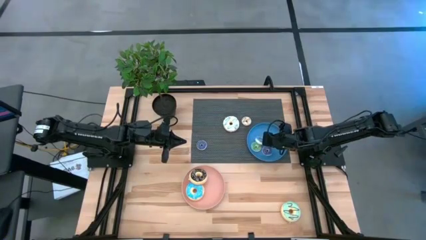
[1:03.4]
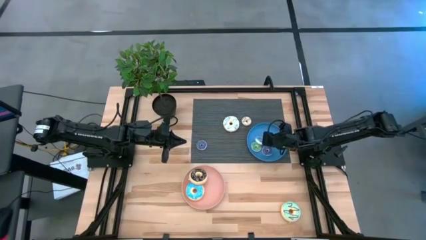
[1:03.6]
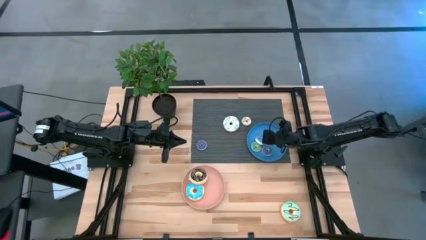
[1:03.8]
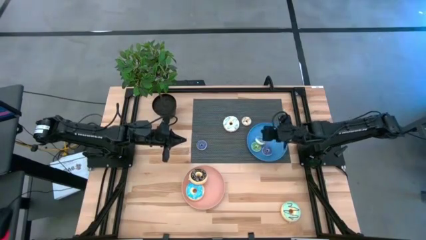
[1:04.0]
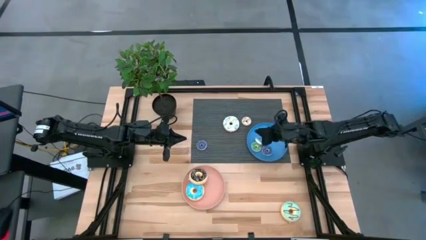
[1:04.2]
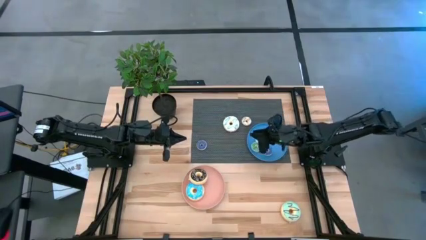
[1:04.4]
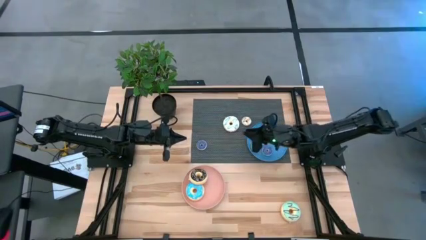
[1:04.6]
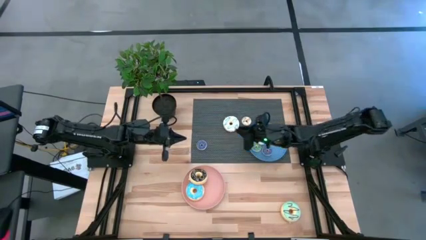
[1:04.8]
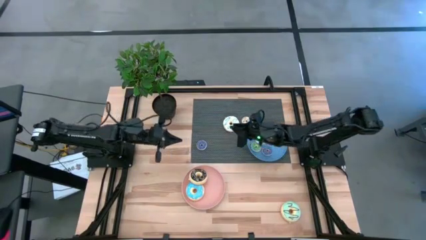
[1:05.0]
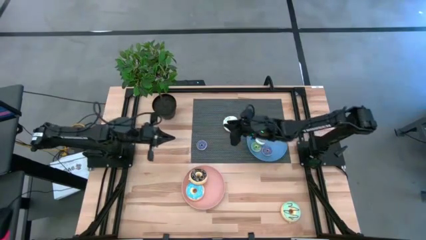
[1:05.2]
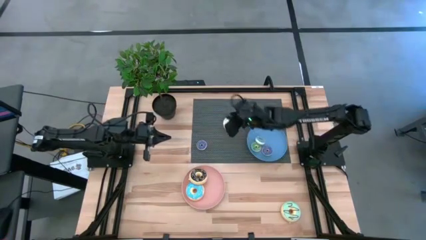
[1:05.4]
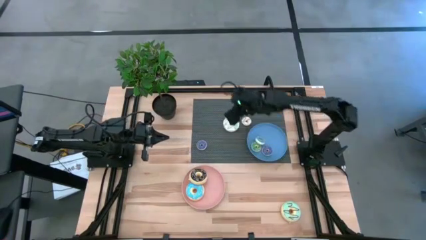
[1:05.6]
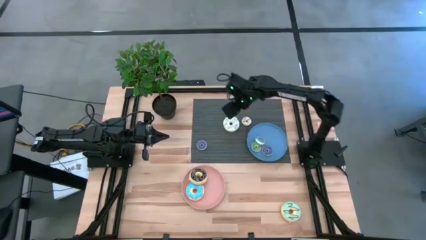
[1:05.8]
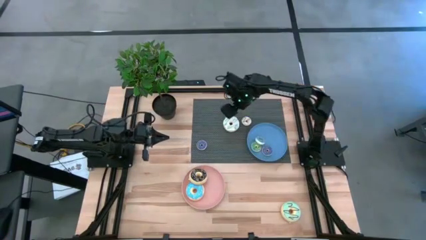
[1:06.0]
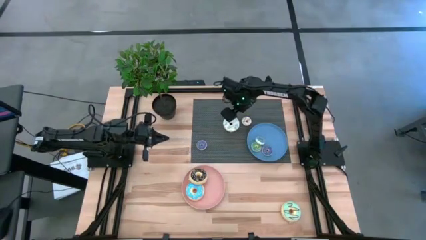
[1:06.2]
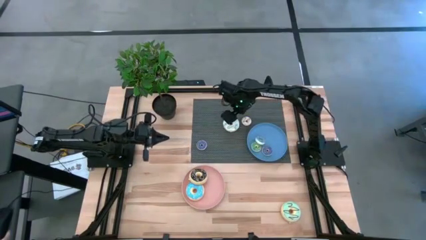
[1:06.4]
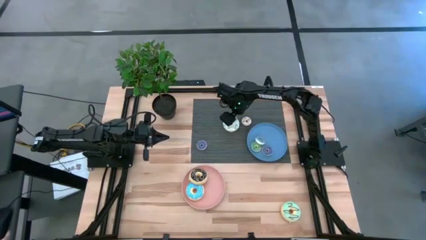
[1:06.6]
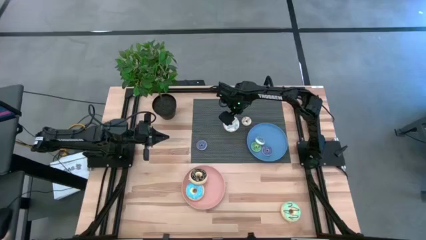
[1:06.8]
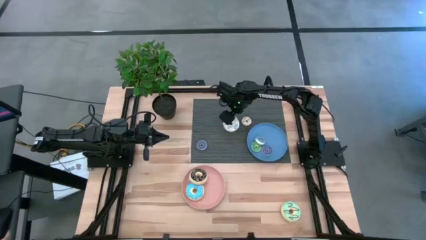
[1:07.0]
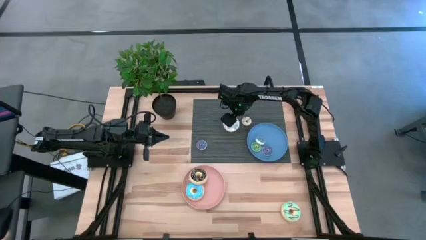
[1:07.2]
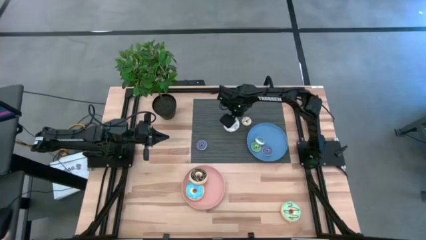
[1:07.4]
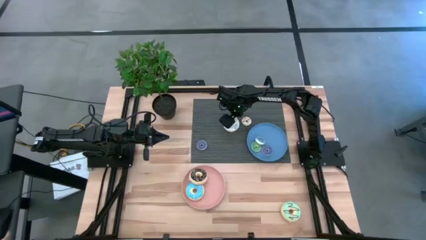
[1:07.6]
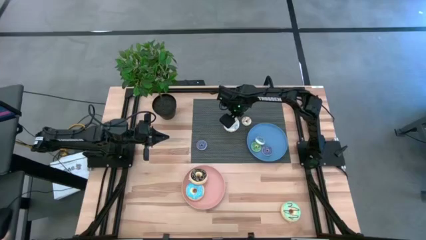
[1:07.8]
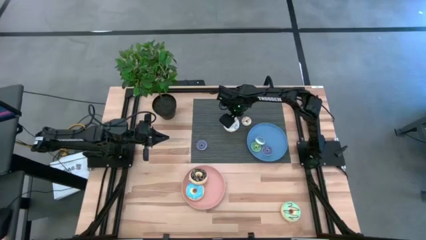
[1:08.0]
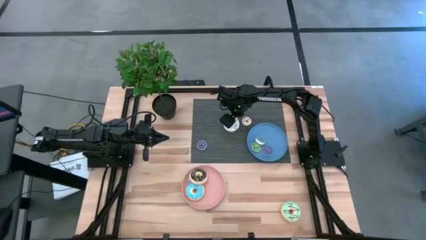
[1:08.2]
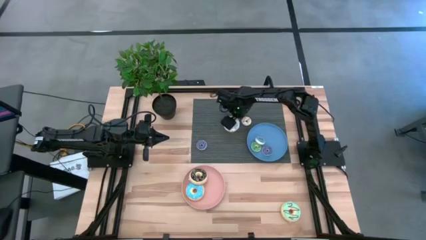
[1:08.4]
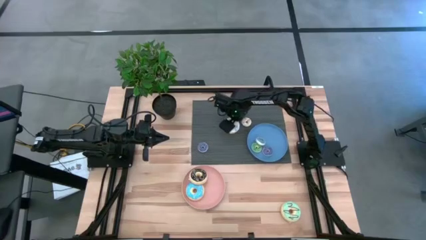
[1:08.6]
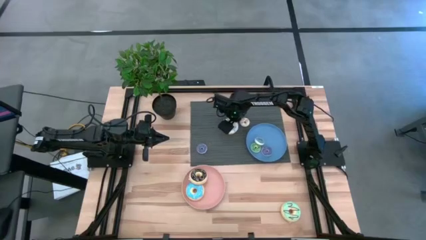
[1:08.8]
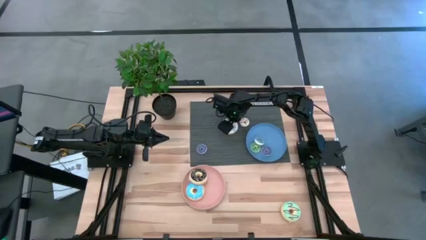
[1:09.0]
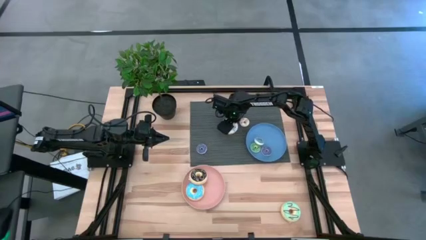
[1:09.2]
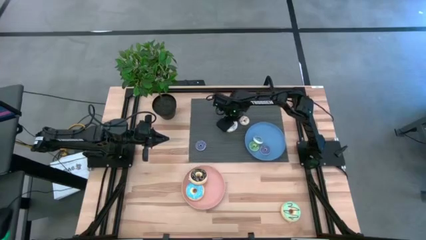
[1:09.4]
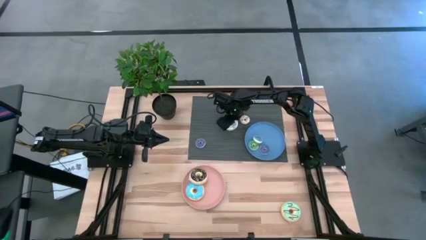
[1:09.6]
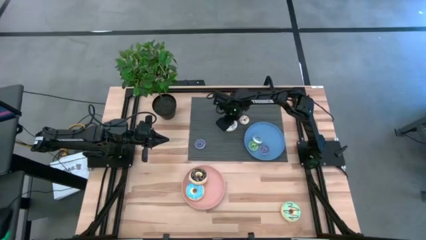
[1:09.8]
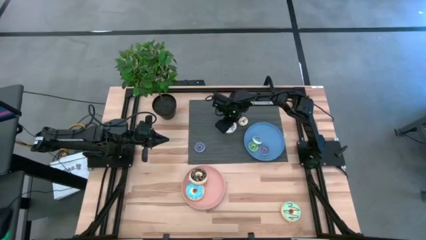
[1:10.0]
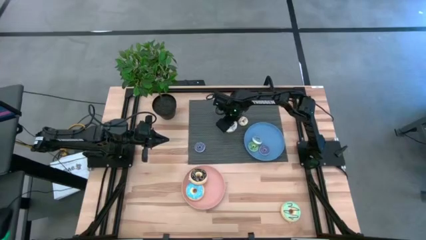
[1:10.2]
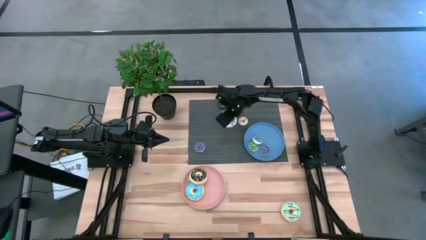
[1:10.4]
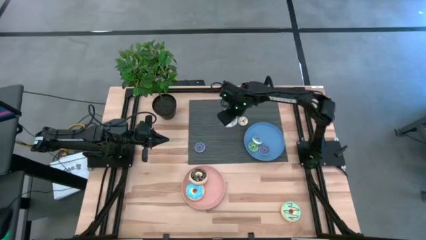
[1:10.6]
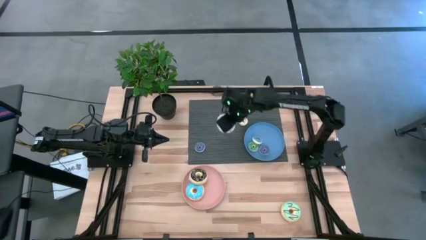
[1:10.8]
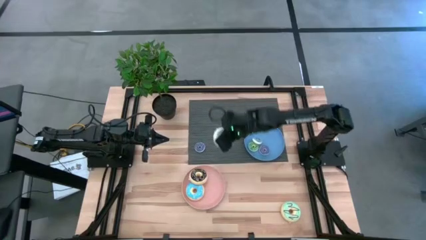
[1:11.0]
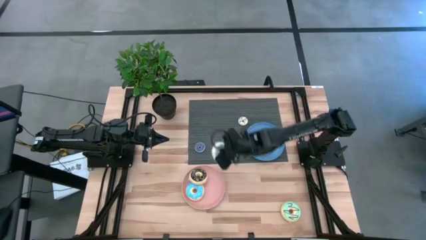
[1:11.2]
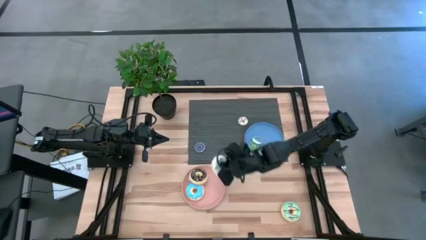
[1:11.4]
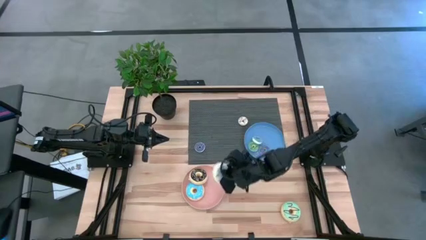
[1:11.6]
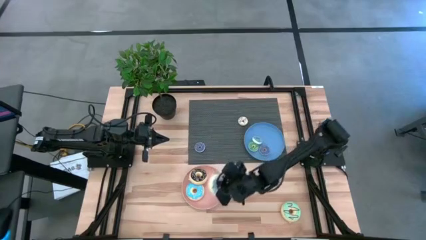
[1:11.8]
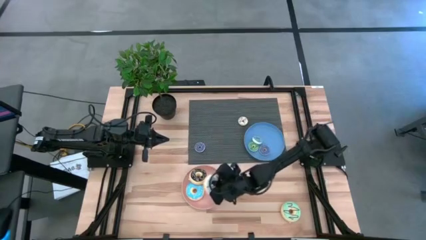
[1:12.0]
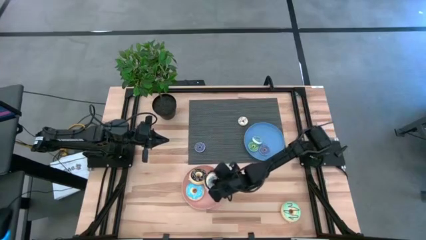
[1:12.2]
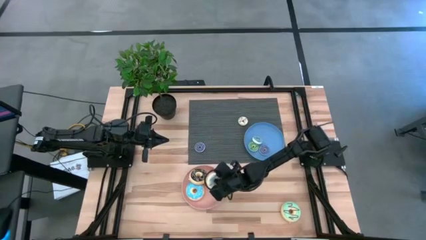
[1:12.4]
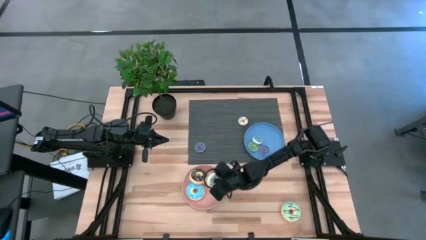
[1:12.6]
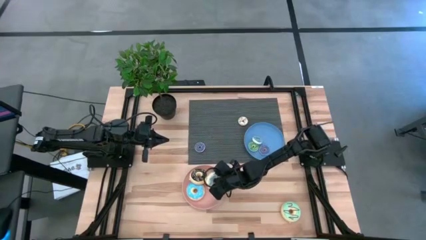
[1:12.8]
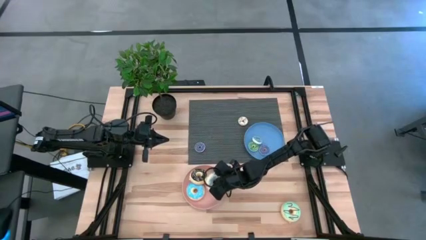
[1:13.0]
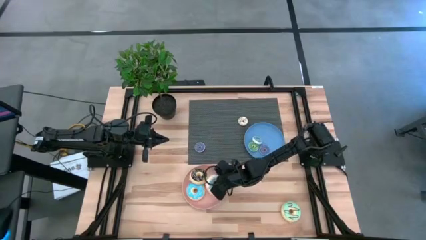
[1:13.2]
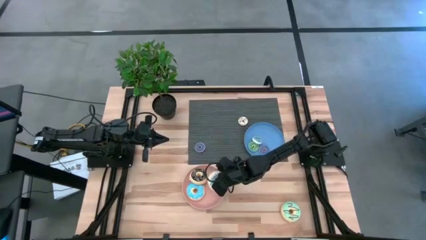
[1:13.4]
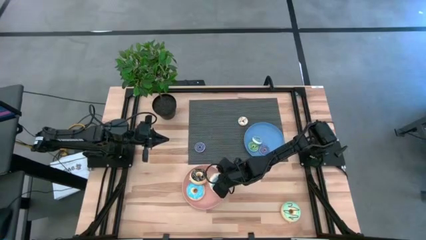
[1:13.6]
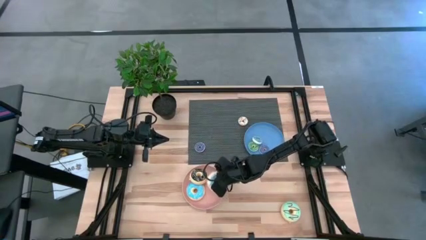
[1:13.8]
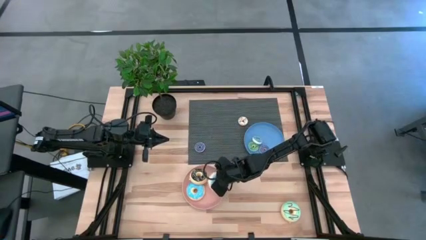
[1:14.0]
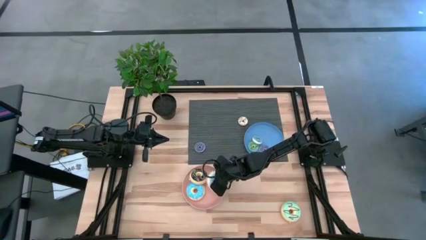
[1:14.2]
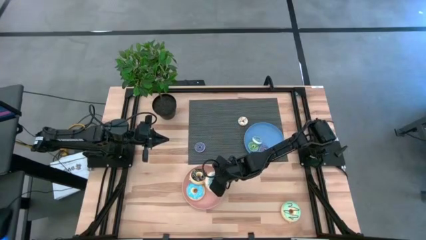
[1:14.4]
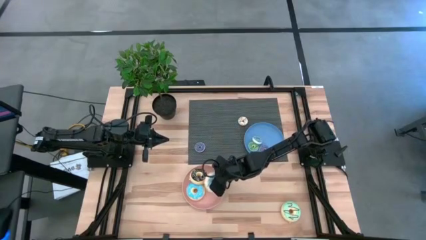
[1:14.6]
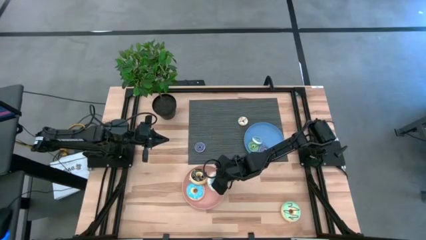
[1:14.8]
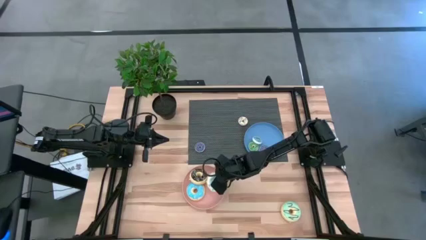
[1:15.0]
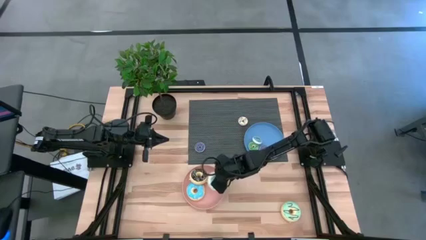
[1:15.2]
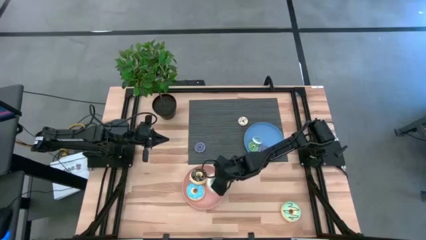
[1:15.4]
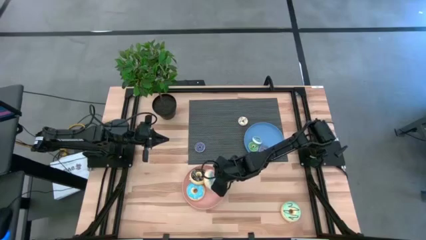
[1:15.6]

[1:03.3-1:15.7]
Task: Pick & Place donuts
Put the large white donut onto the light orange plate

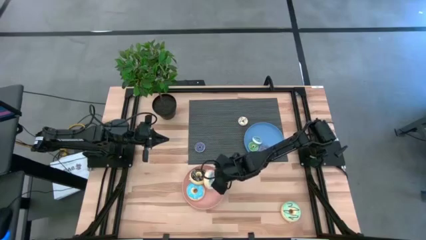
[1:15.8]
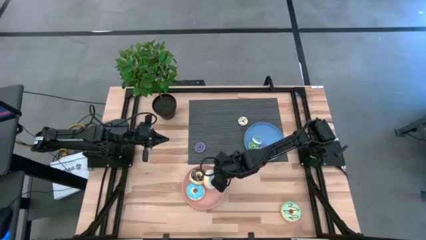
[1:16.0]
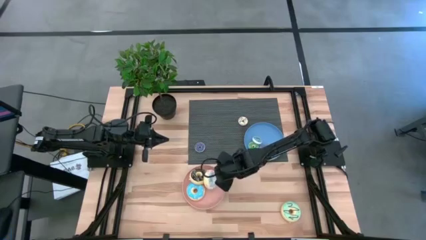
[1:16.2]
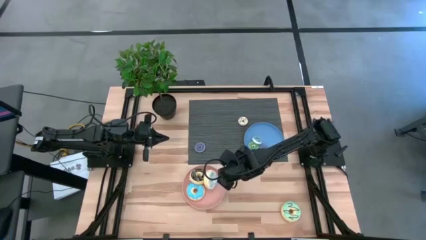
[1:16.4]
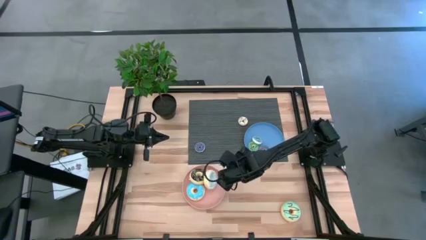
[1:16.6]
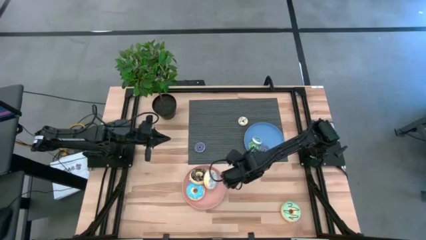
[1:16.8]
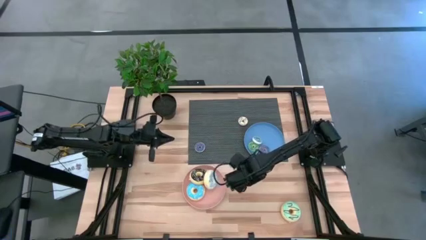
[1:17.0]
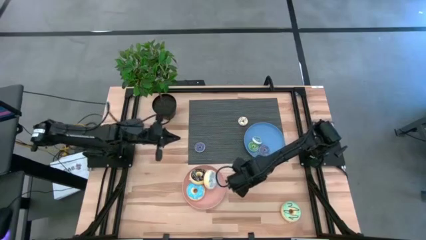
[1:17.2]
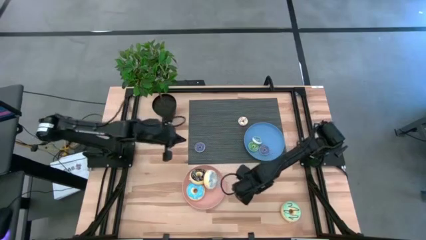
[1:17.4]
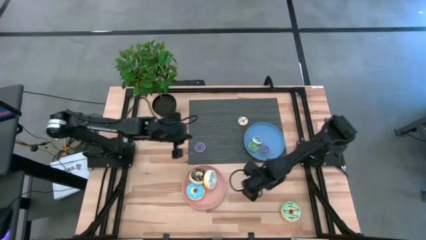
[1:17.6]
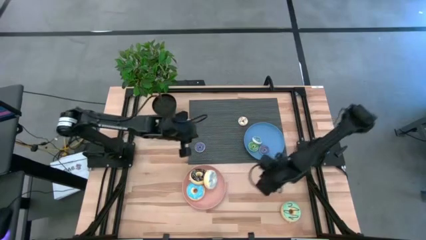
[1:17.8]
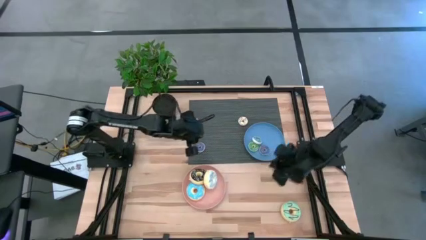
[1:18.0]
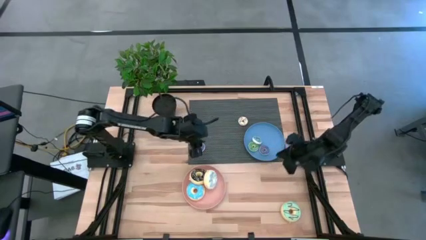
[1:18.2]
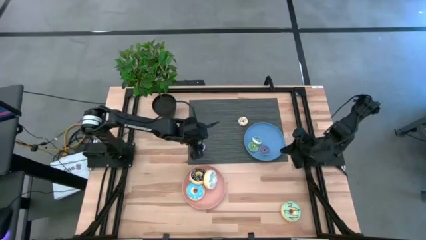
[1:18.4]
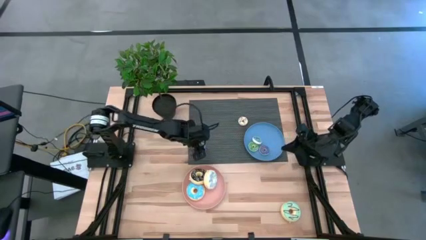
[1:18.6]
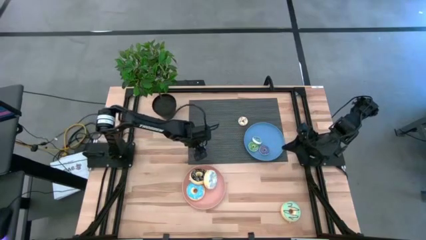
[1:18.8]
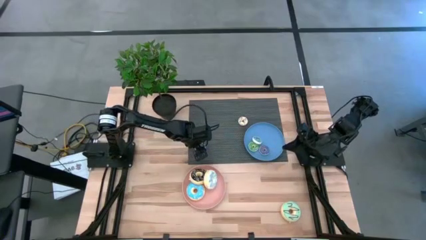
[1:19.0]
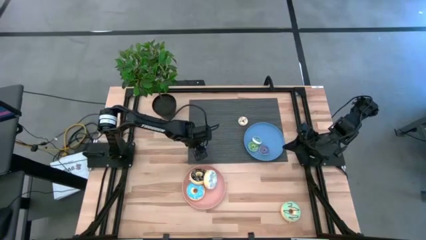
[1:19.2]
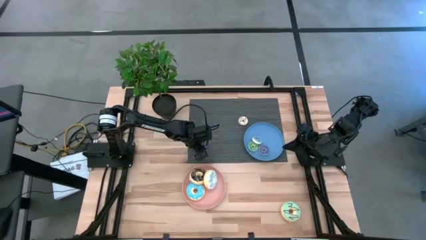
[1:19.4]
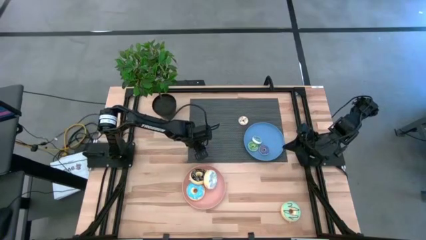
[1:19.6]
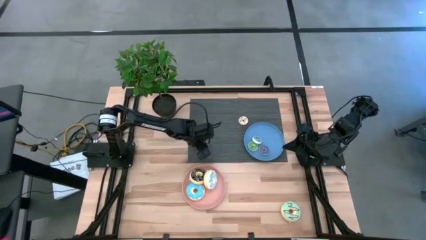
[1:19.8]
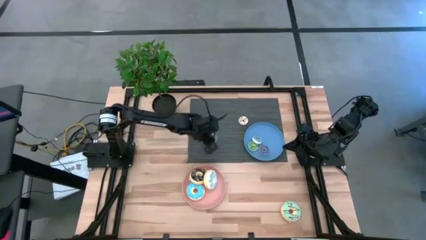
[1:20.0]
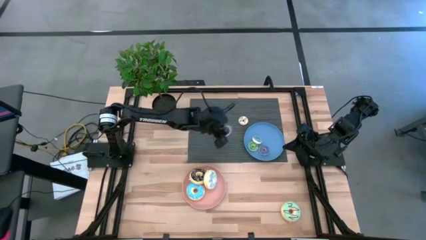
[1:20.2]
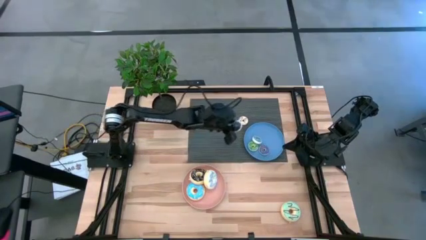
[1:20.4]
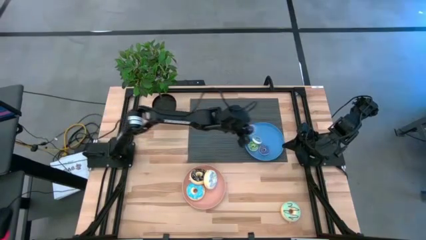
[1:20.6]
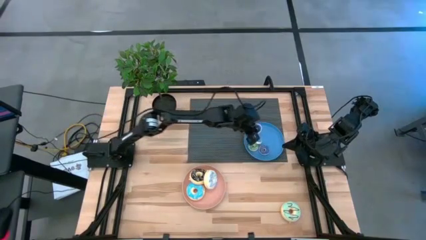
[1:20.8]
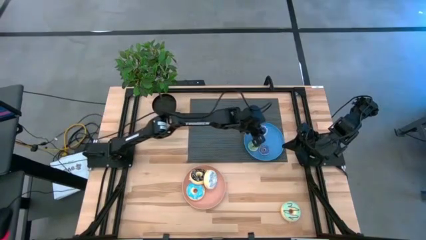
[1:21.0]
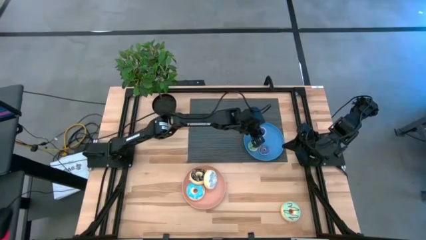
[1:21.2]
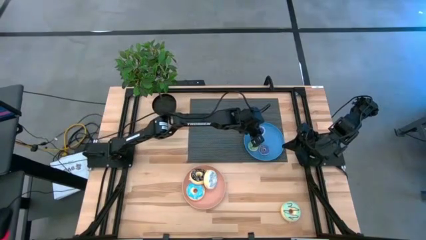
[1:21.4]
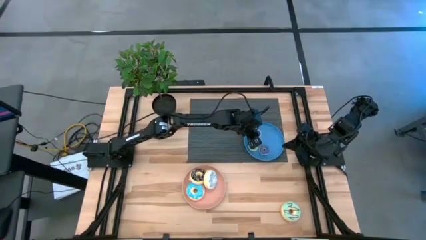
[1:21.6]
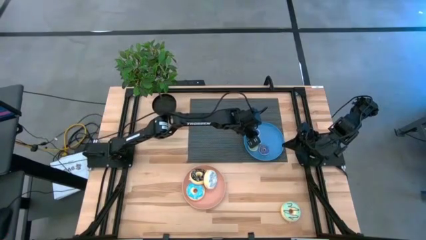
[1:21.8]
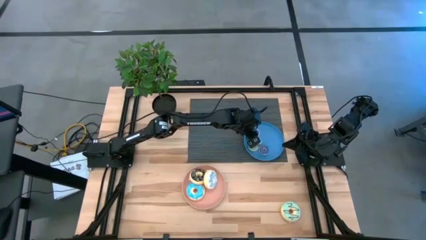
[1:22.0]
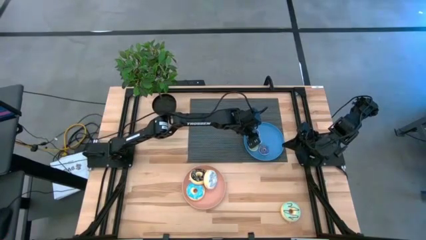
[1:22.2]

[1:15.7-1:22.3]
Put the small dark blue donut onto the blue plate
